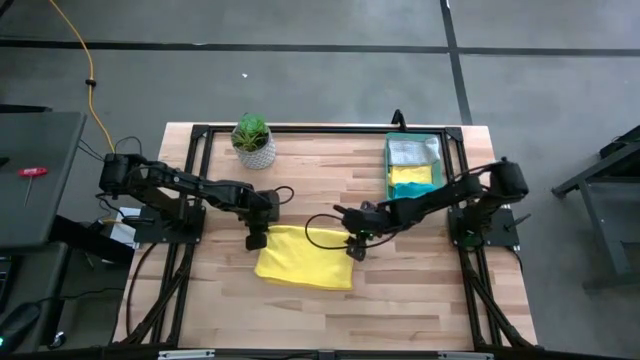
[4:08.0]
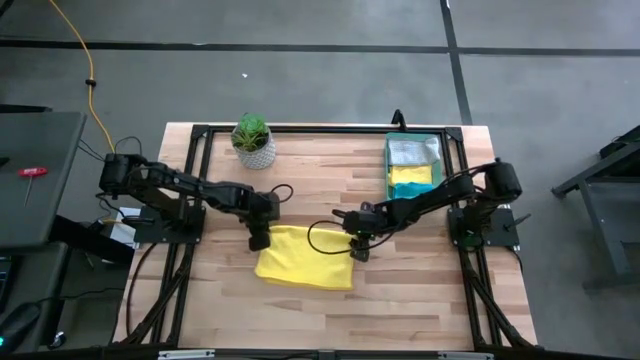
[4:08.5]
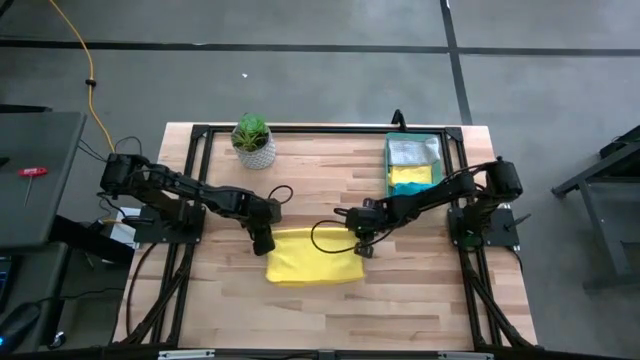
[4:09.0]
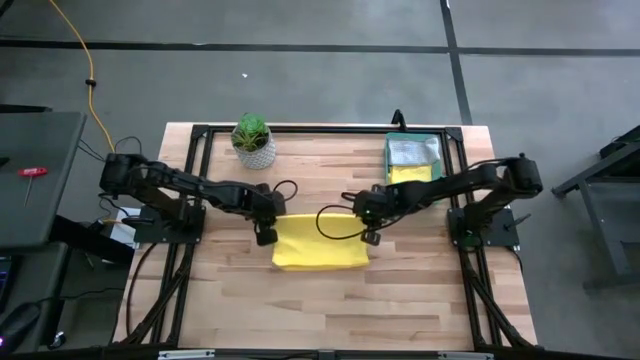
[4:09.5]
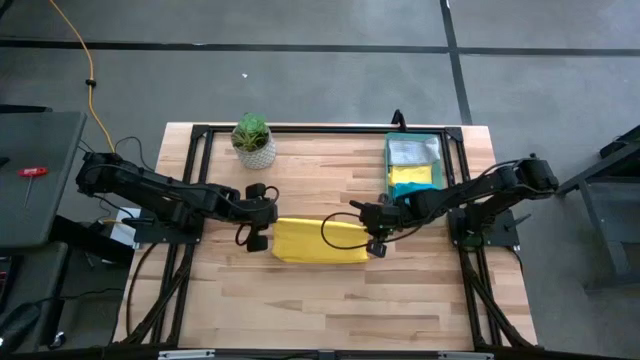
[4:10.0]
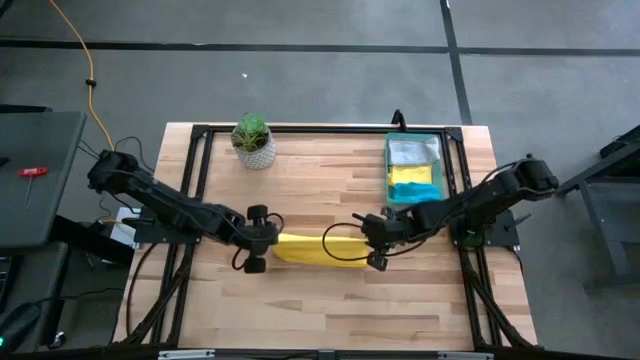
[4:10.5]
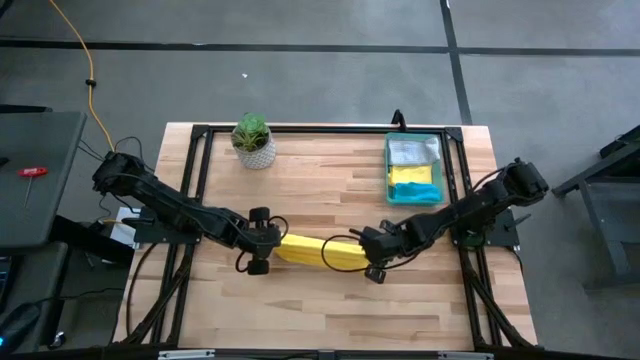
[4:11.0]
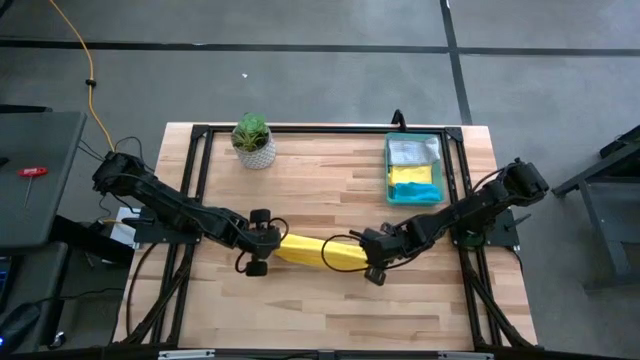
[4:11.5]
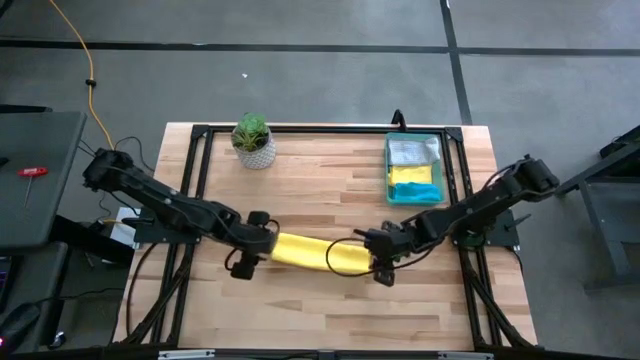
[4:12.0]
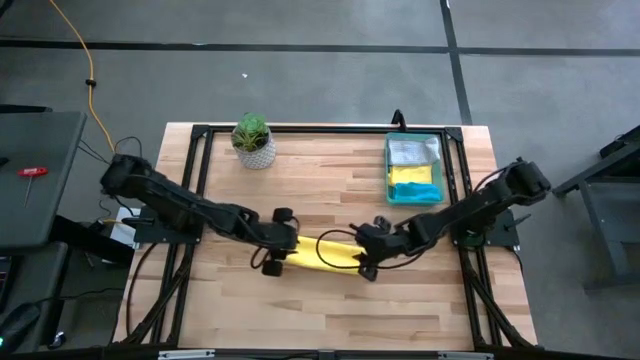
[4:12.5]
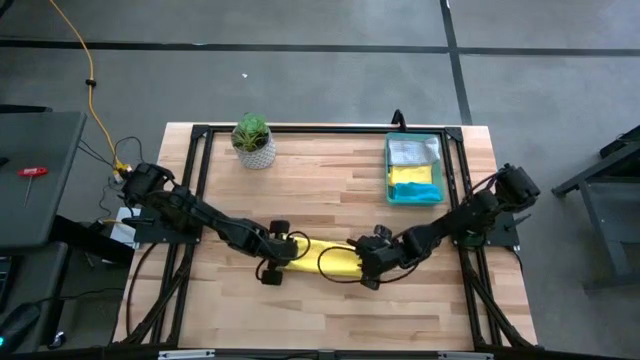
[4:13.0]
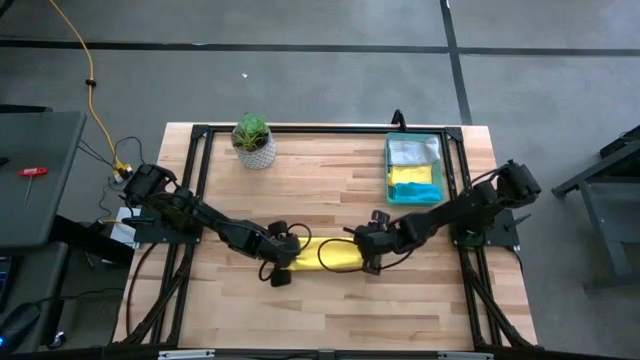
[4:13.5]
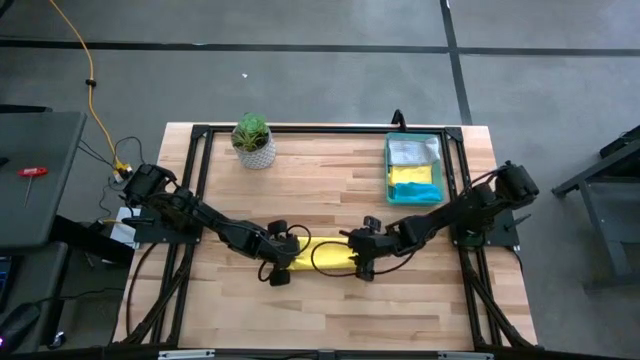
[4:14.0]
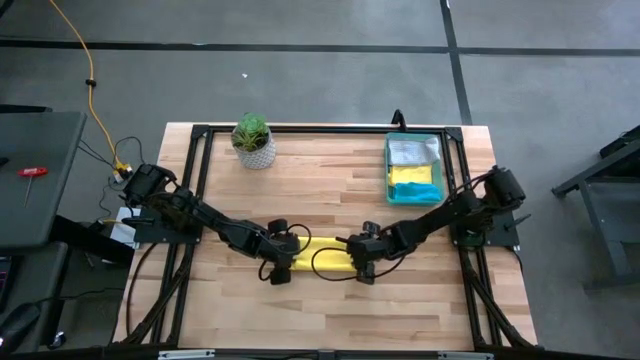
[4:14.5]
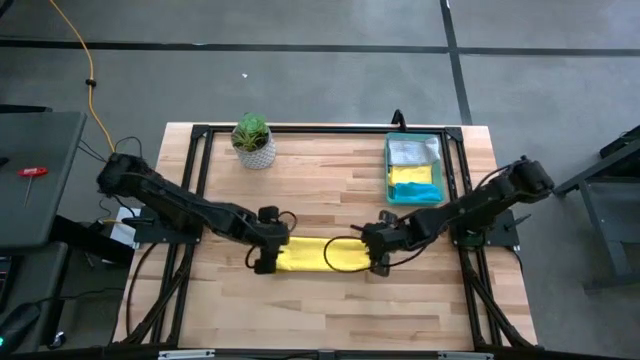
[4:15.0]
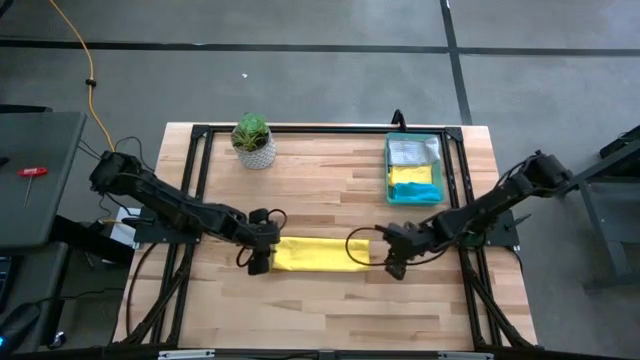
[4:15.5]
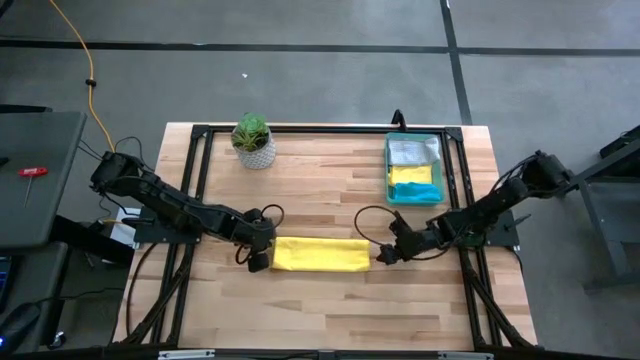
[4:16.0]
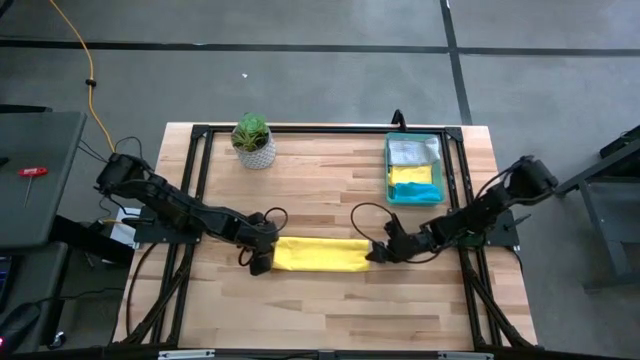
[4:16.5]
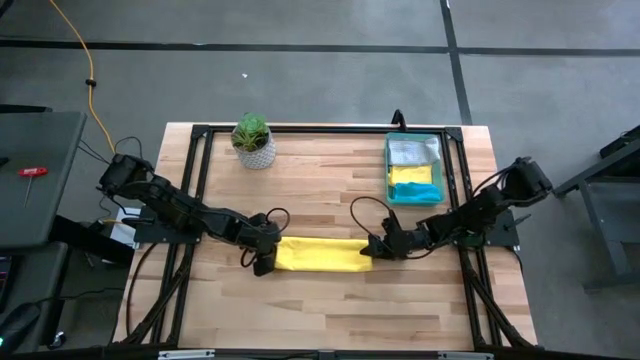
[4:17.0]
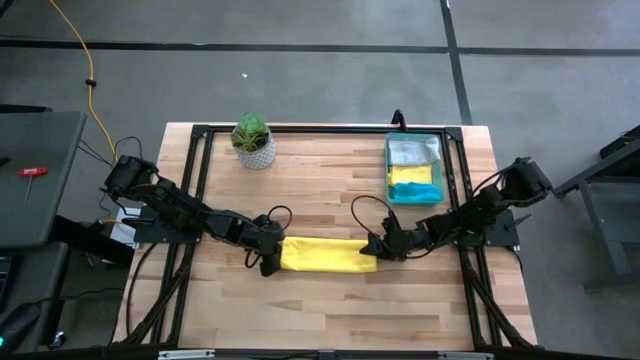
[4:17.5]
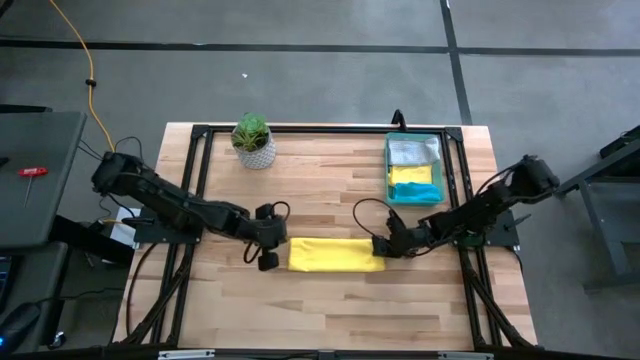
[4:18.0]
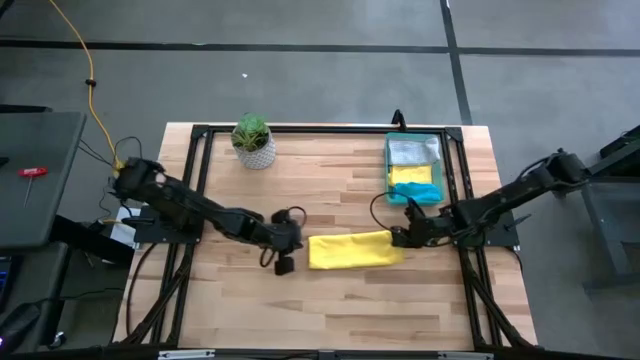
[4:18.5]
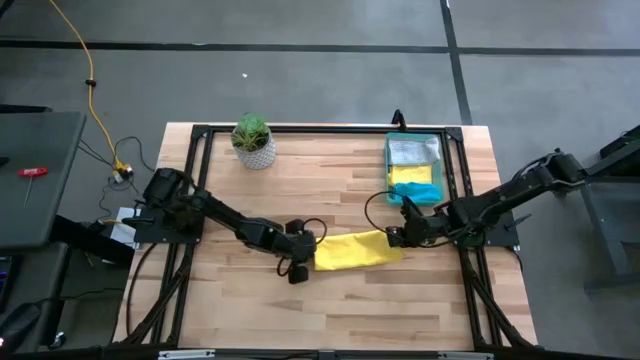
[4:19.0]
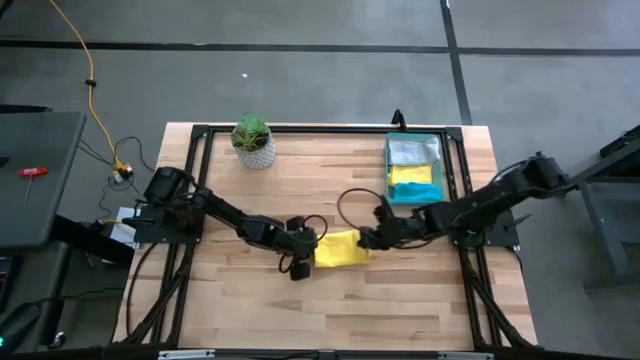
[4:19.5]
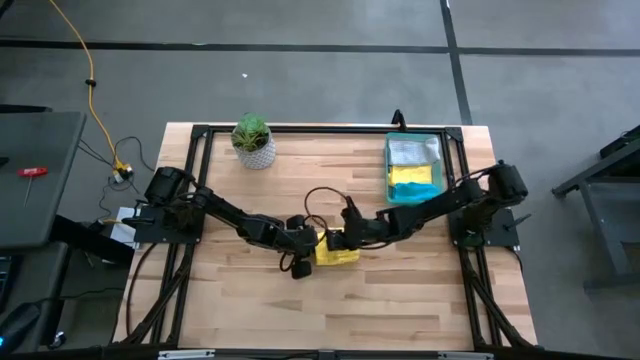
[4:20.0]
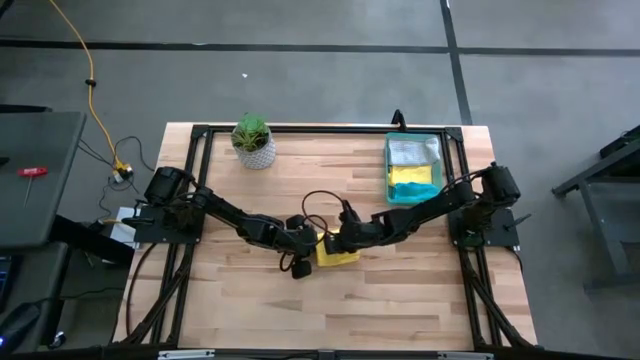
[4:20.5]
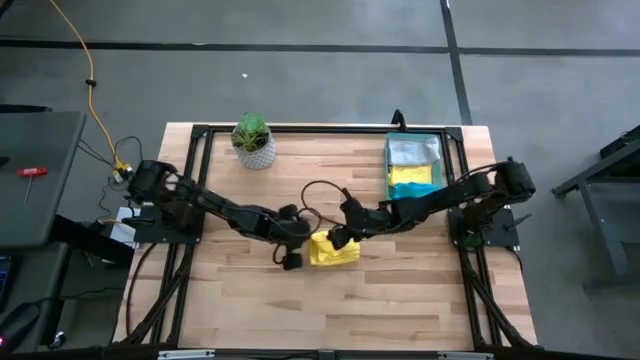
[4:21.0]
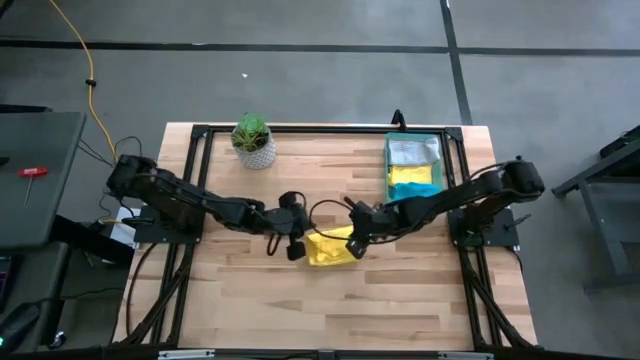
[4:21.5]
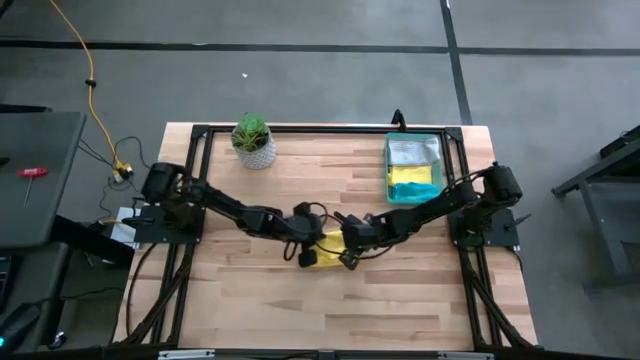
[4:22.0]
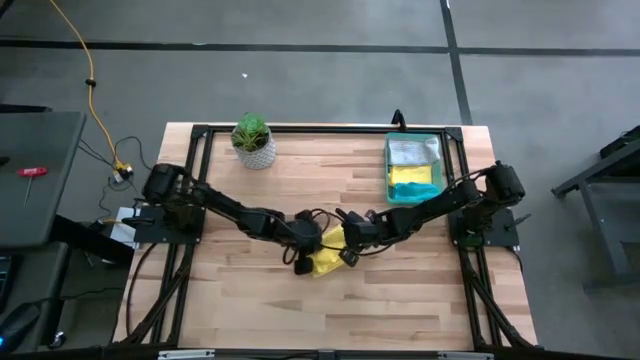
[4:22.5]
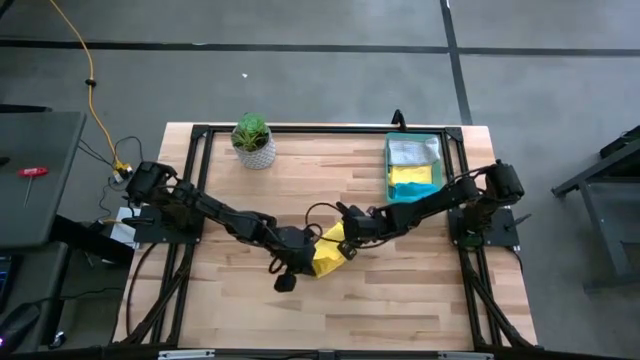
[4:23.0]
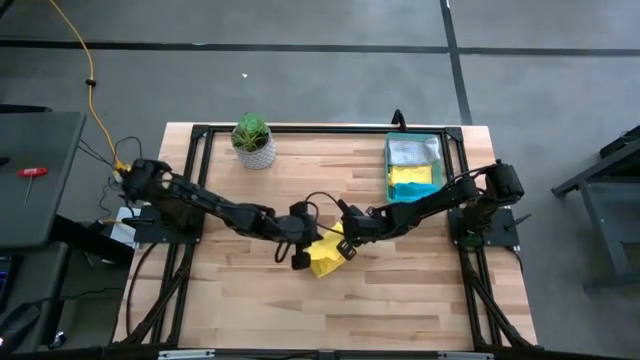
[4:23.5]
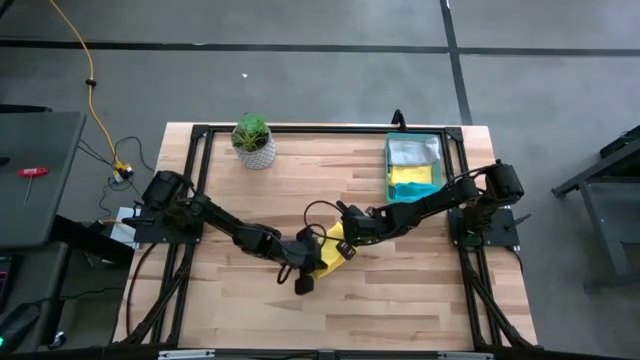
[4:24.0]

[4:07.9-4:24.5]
Task: Fold microfiber towels
Fold the yellow microfiber cloth

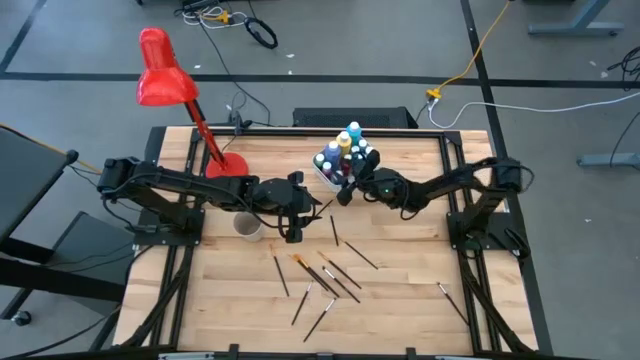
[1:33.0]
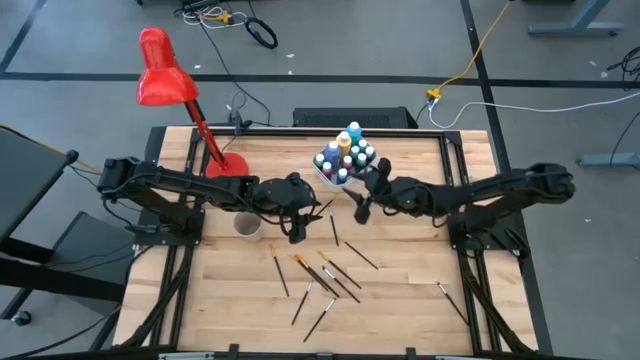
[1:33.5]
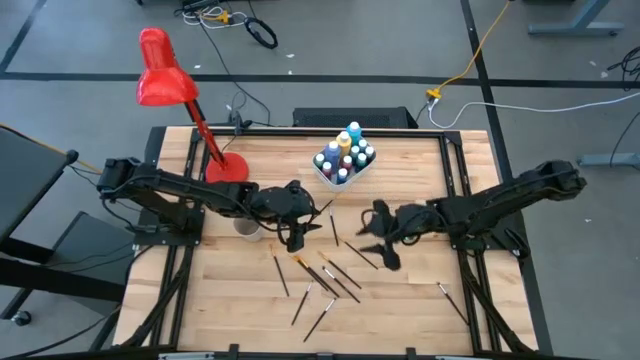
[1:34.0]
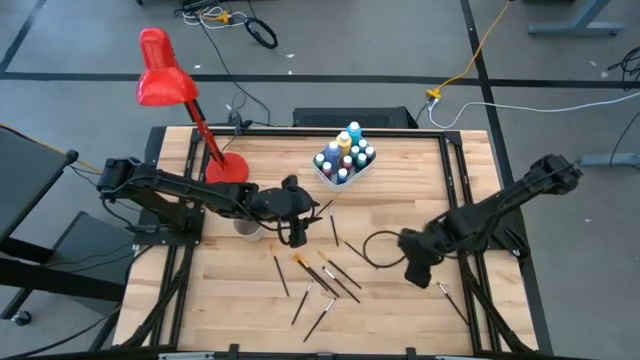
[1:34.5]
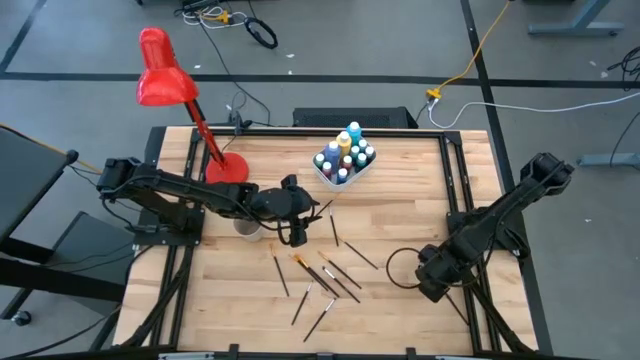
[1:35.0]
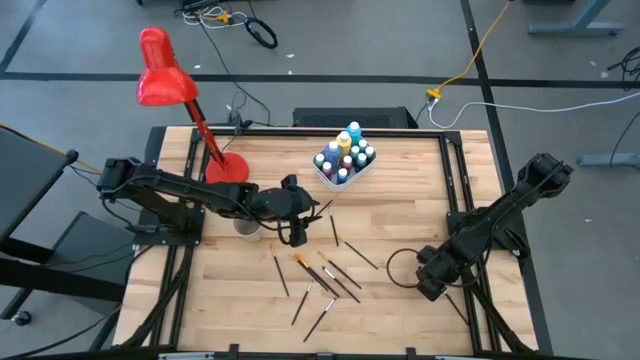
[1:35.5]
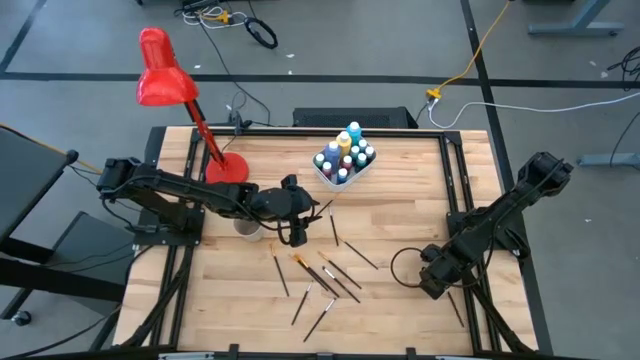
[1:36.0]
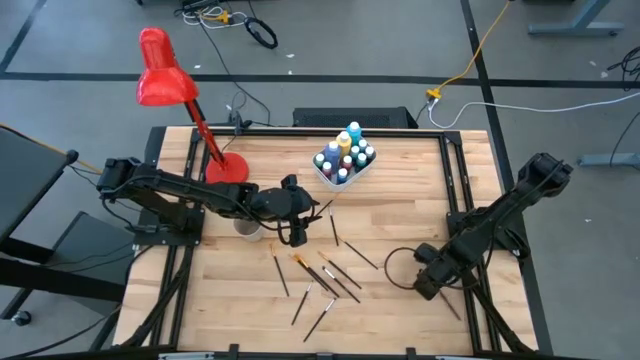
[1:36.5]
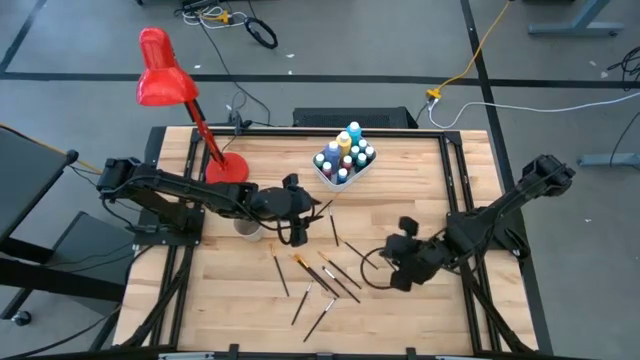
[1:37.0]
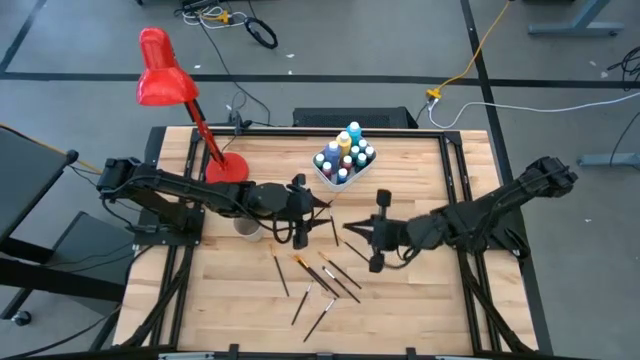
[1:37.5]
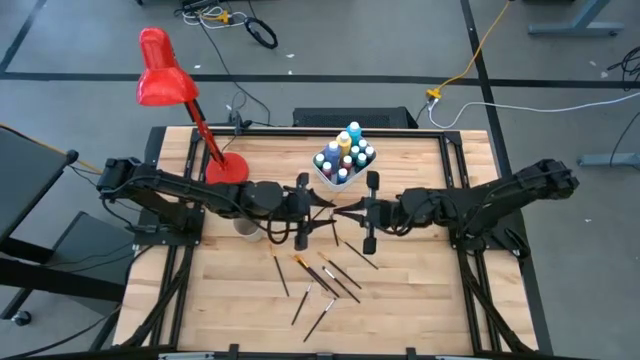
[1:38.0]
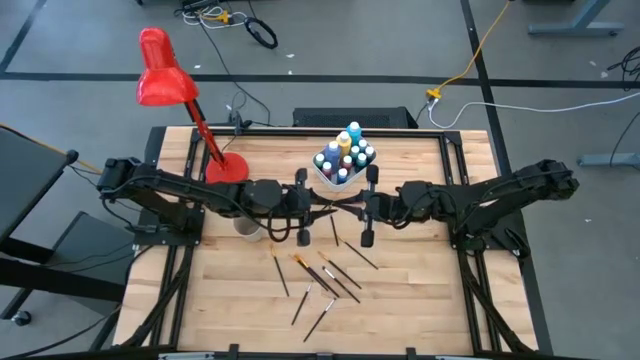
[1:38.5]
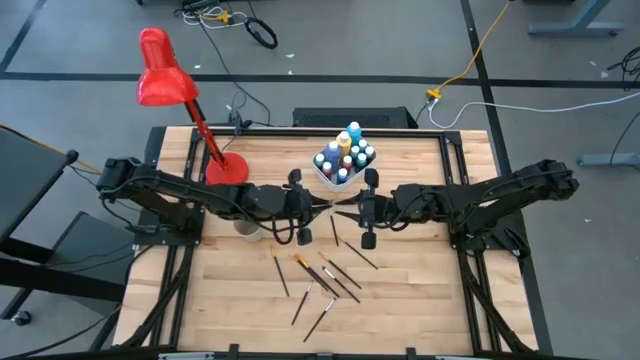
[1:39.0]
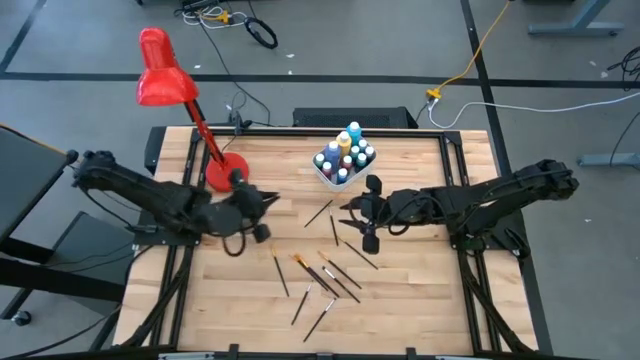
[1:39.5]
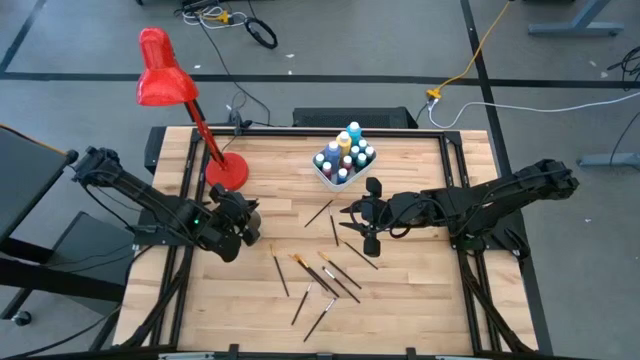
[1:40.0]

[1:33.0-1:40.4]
Task: Pick & Place Paint Supplies
Put the silver paint brush into the white cup
